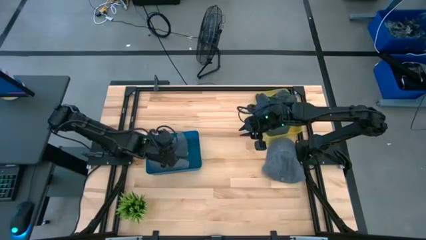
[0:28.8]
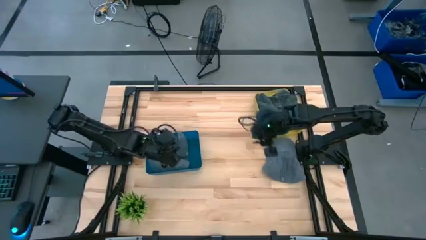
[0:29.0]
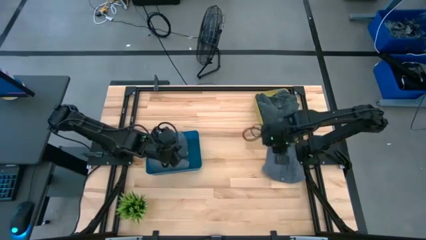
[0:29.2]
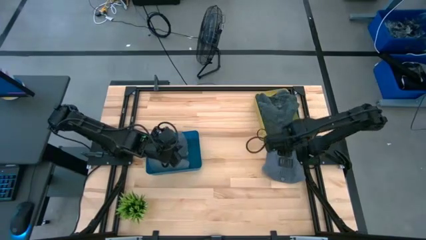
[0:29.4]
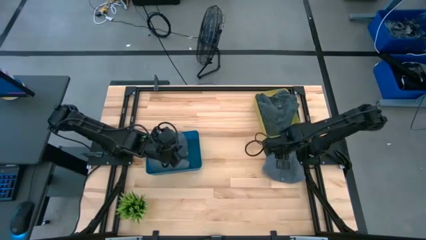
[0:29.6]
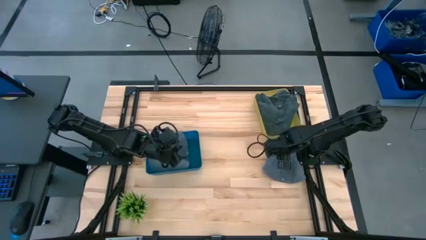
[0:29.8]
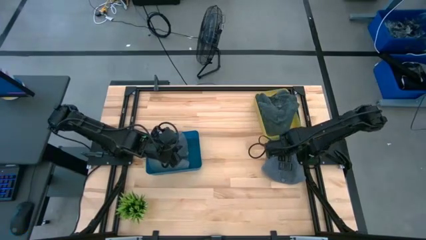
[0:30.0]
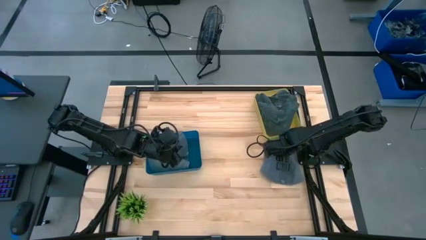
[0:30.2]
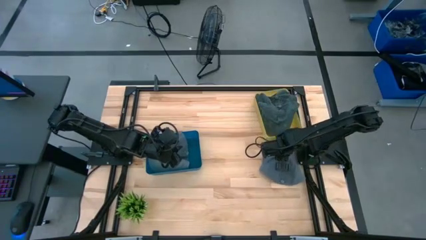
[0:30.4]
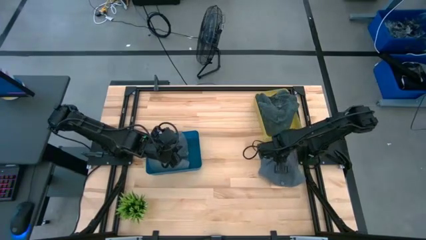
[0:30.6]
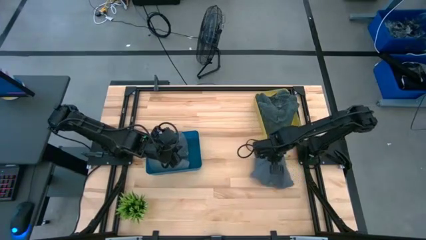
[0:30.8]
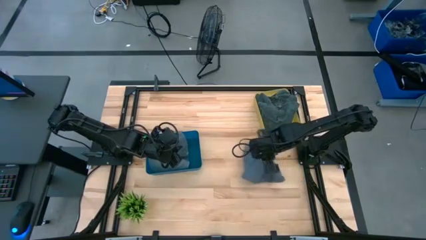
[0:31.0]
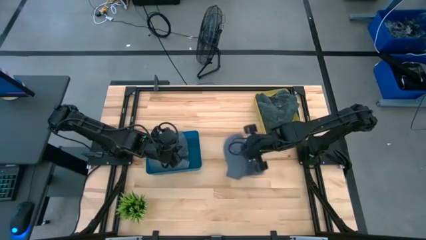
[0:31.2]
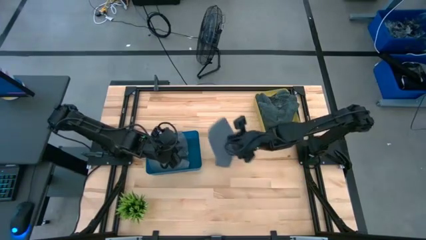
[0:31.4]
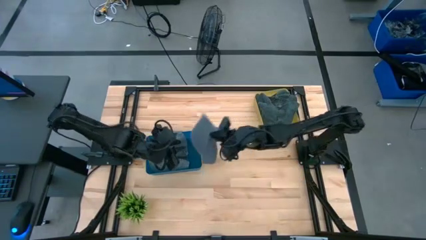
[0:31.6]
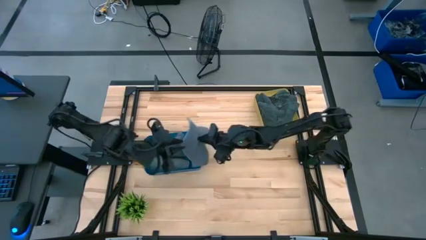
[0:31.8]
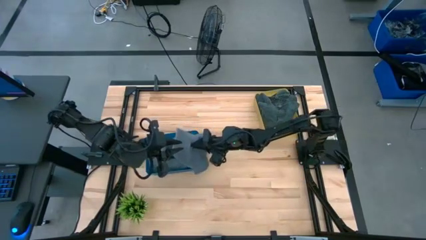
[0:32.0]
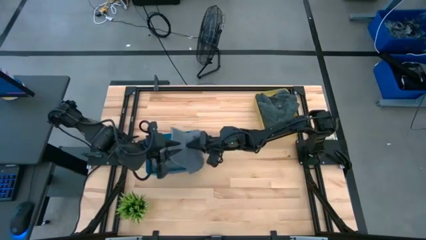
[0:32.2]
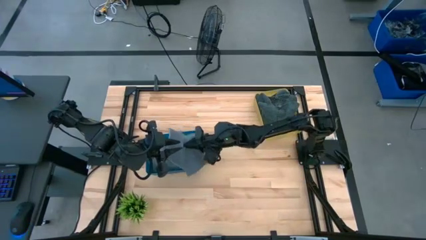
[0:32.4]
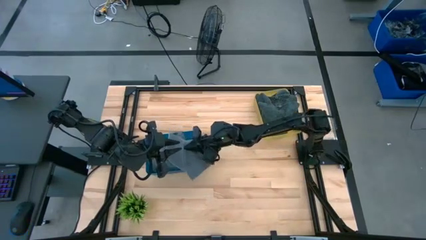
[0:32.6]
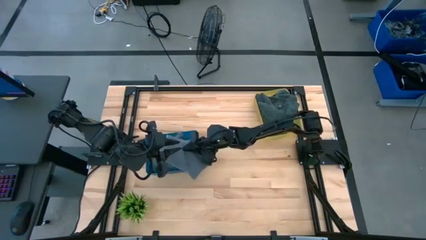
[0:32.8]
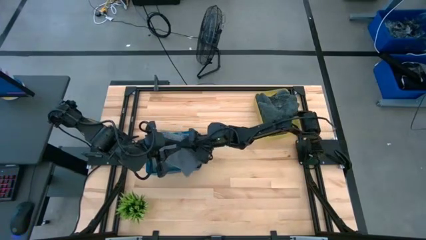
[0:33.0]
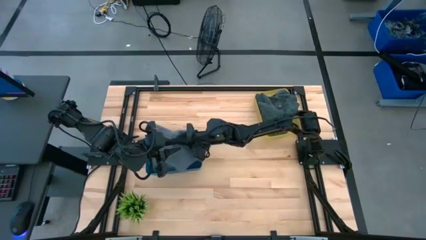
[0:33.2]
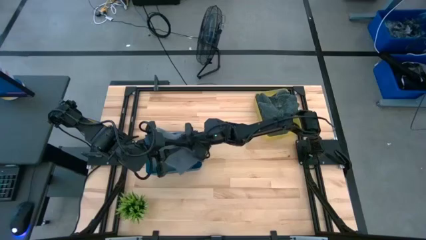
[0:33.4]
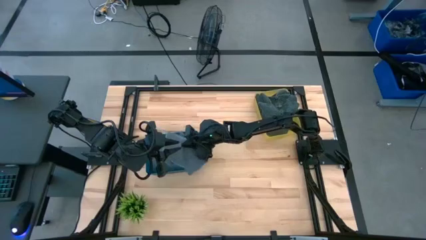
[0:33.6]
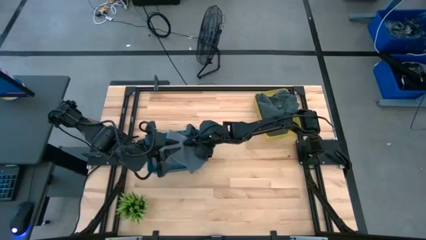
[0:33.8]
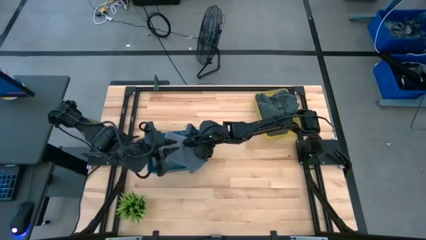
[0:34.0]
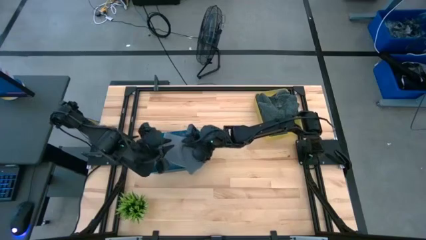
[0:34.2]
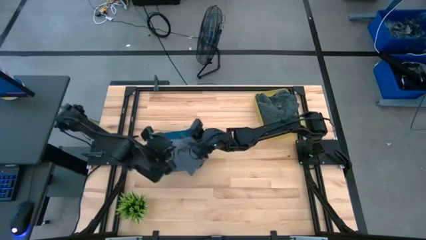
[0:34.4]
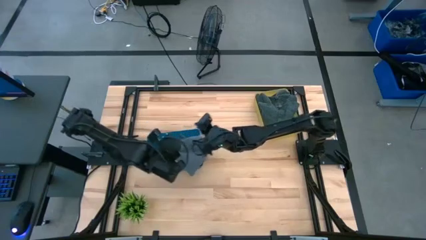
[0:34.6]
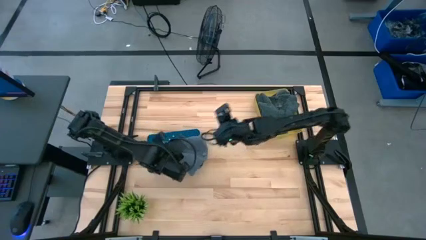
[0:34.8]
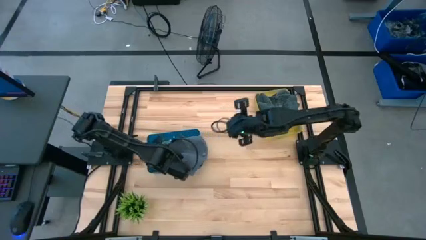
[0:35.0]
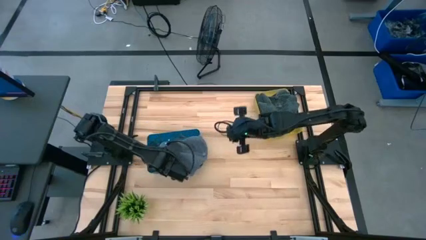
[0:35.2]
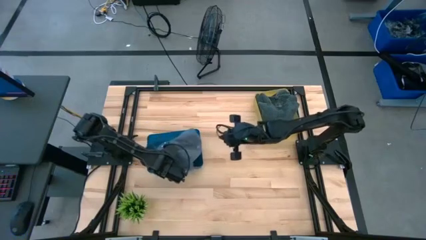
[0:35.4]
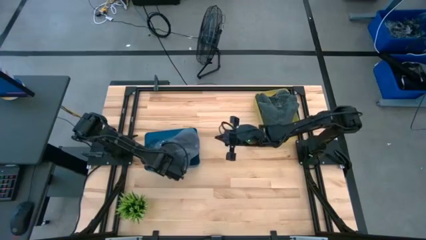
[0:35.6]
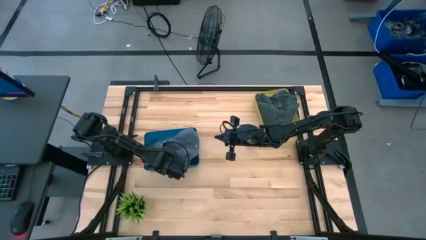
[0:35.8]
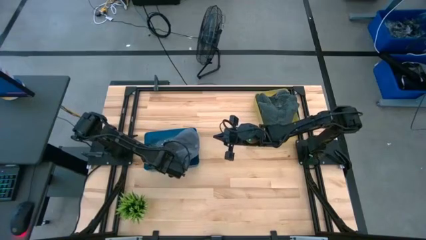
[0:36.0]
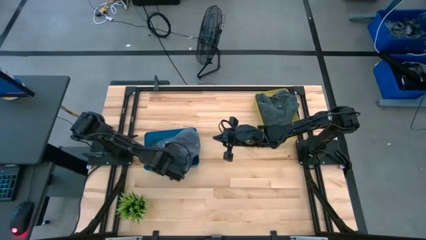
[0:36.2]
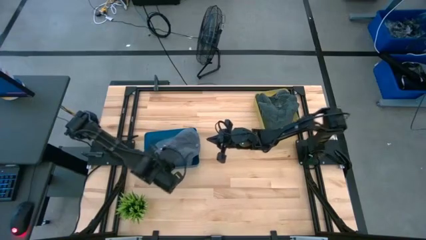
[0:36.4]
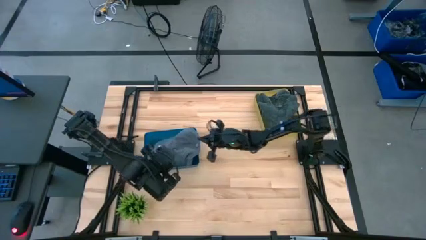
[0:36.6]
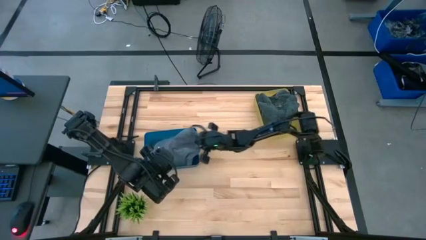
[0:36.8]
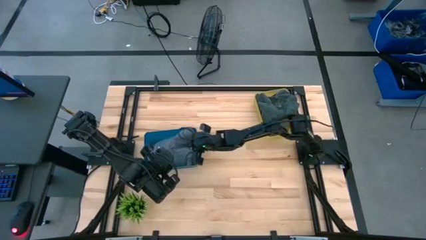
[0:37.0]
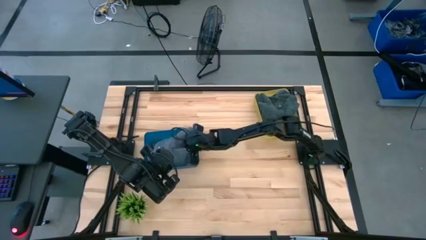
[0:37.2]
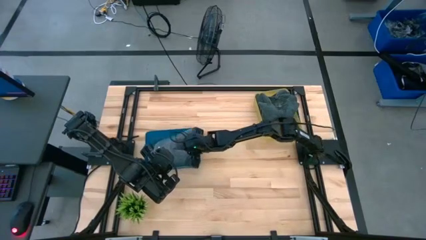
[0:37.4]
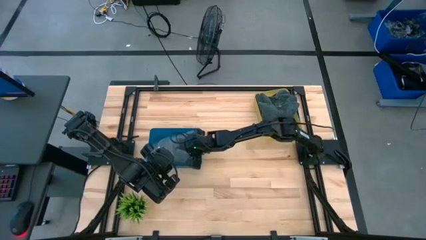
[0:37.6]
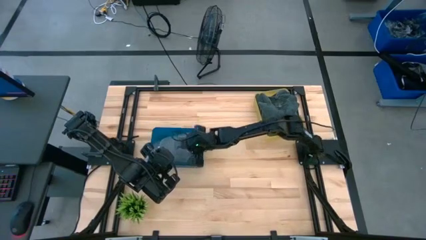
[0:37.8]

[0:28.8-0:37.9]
Task: Pick & Place hat
Put the blue cap into the blue bin

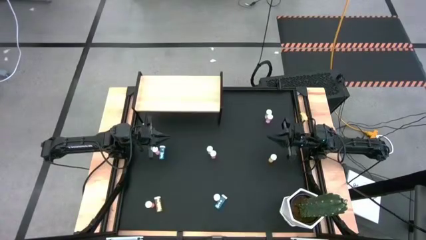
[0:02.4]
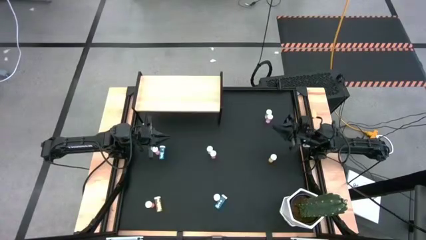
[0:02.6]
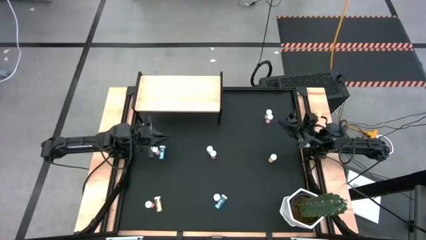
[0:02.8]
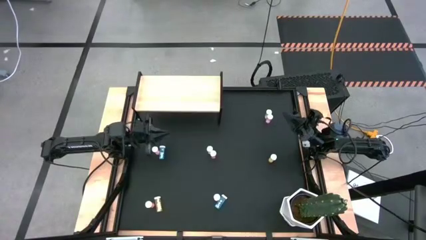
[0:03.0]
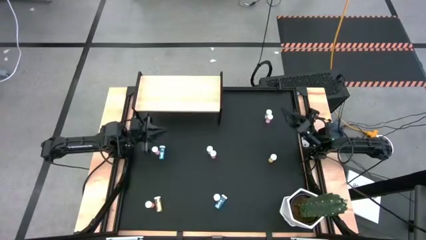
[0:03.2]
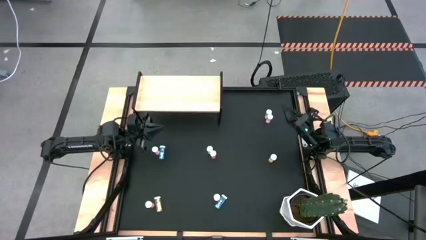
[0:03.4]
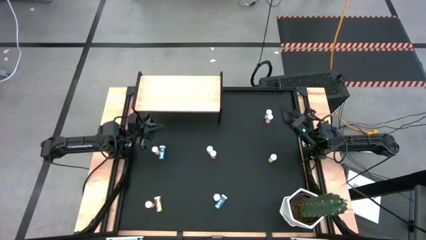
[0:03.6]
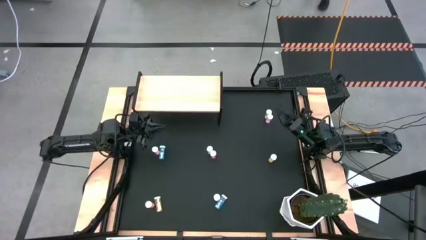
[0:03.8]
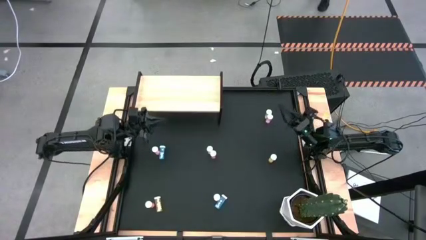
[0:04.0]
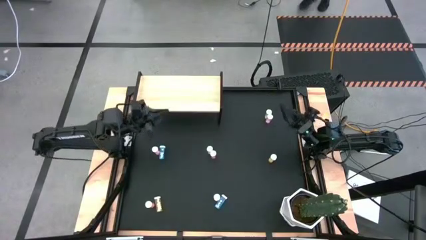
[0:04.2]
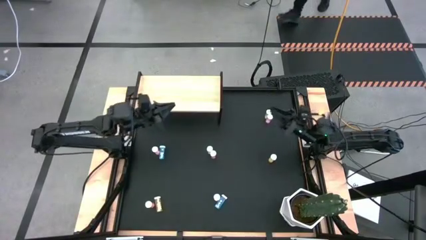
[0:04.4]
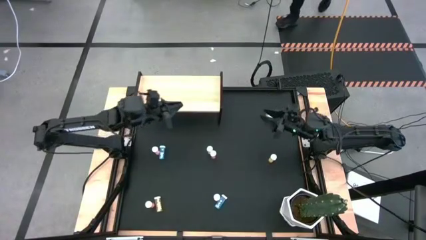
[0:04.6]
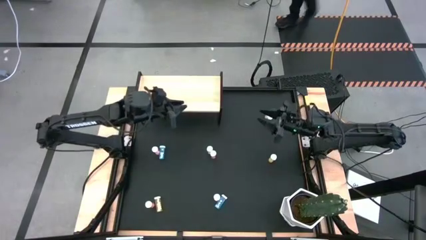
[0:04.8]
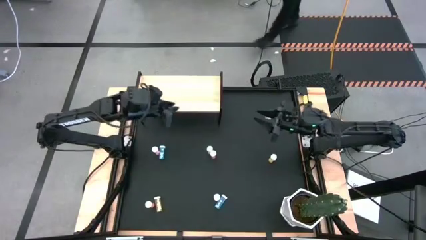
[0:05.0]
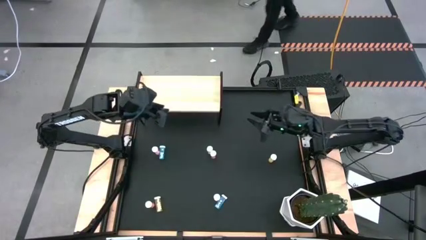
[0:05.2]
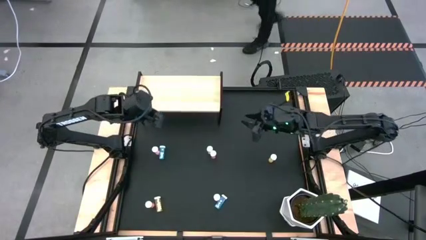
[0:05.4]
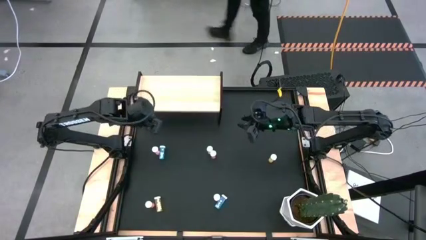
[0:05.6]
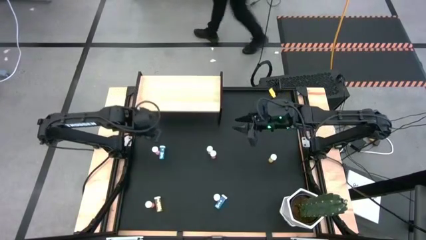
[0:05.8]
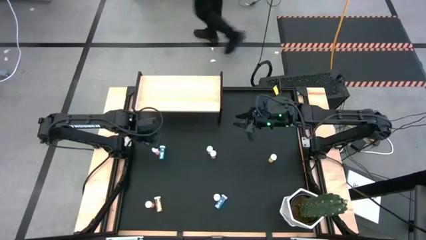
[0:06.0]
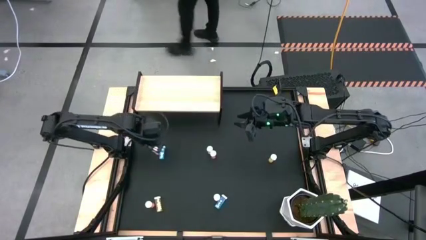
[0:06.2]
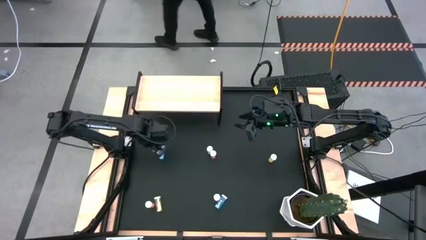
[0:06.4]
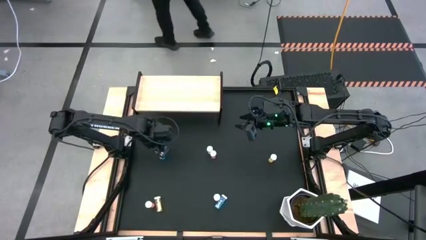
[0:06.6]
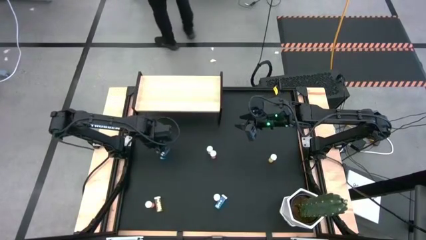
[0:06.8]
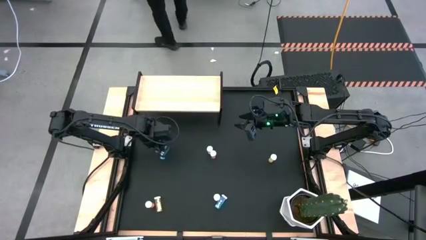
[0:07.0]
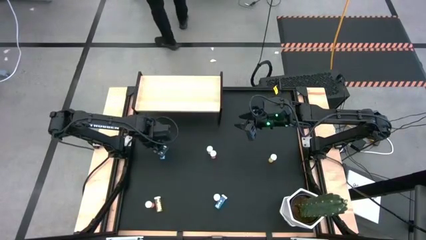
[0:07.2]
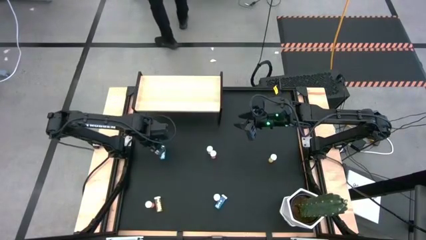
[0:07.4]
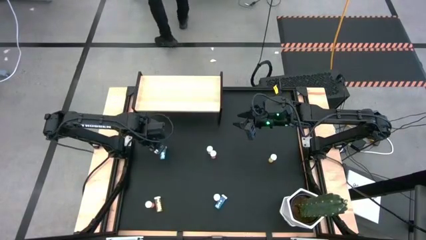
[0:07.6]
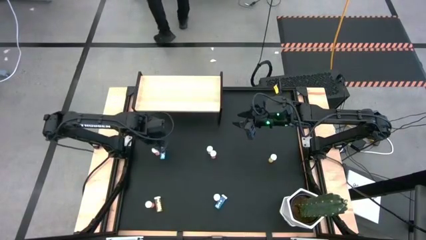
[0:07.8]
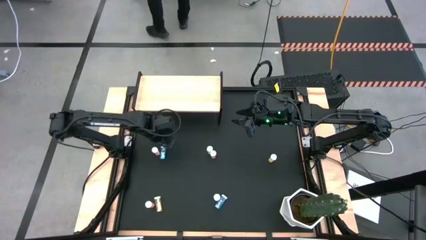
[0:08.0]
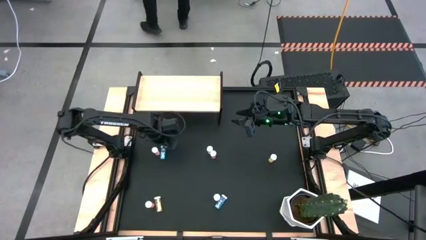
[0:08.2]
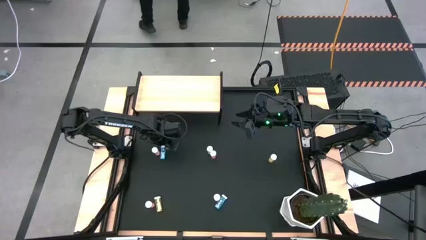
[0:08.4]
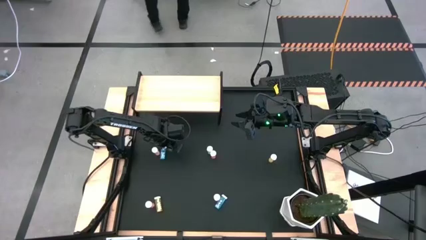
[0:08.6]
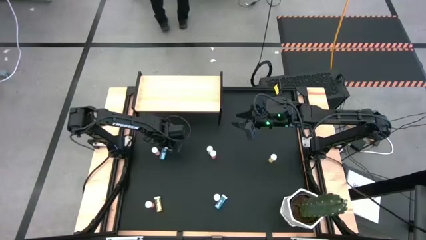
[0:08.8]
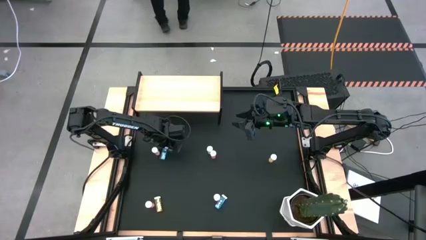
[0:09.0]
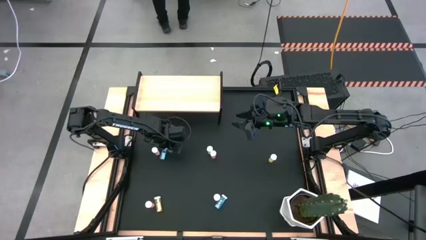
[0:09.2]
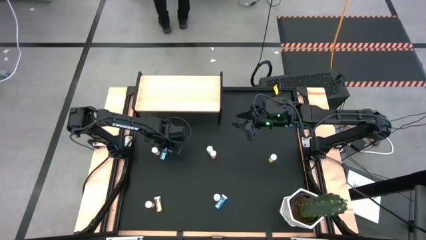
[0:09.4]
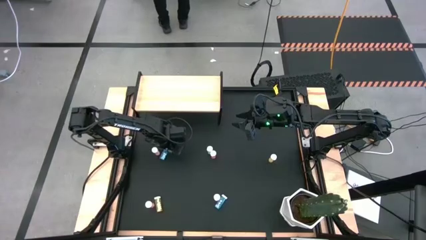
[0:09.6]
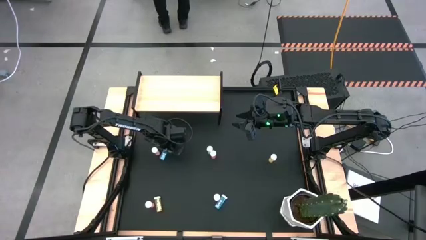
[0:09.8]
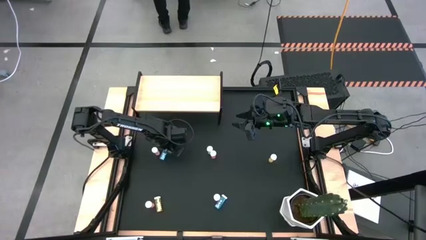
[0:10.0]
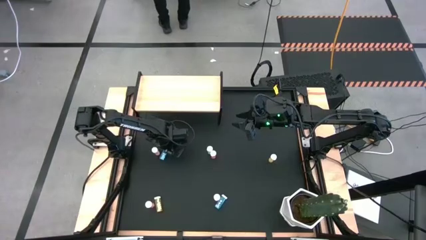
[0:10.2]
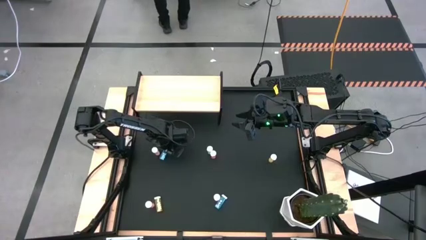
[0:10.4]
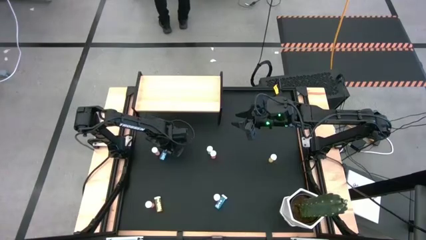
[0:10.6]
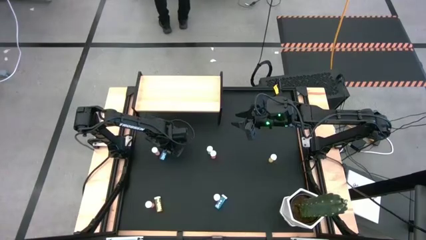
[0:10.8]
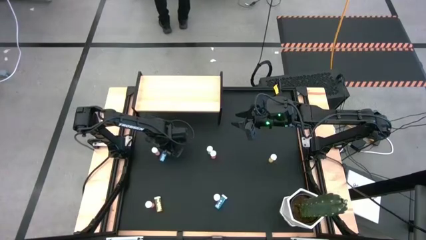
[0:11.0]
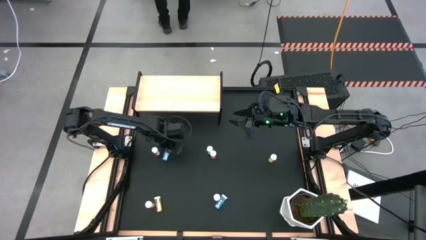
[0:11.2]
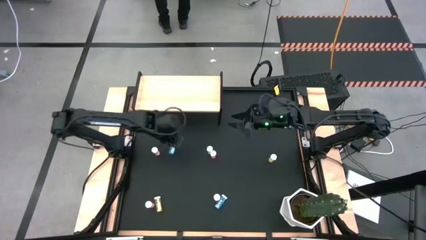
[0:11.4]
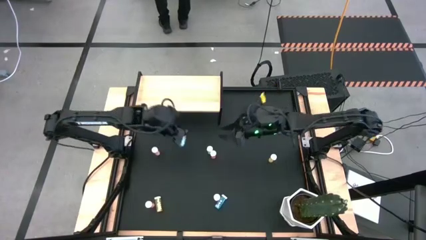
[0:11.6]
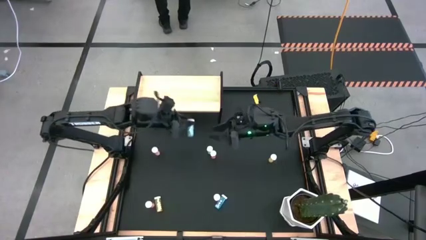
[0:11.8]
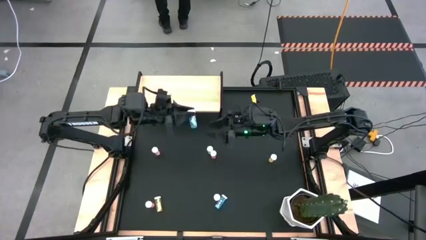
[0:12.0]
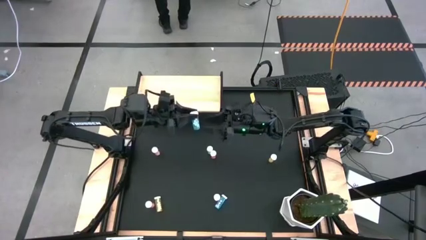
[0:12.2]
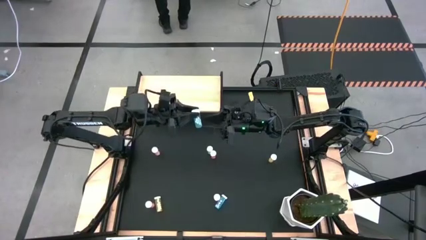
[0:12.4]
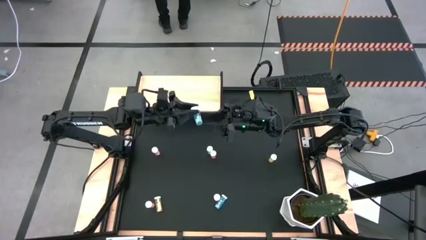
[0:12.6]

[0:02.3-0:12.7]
Task: Pick and place medicine bottles onto shelf by color
Put the top left blue pill bottle on the shelf
